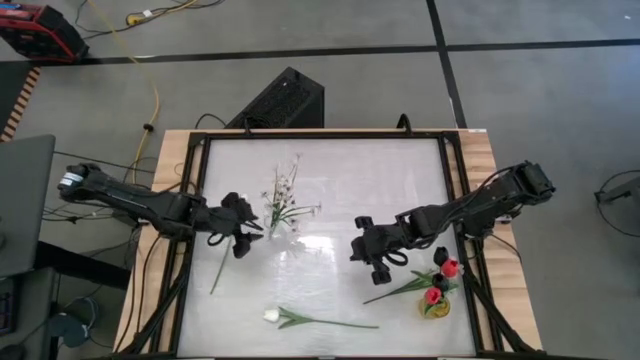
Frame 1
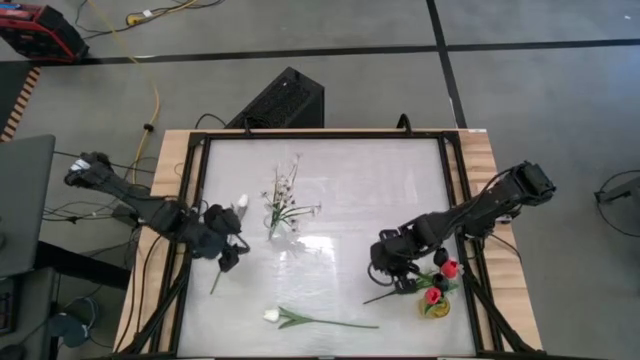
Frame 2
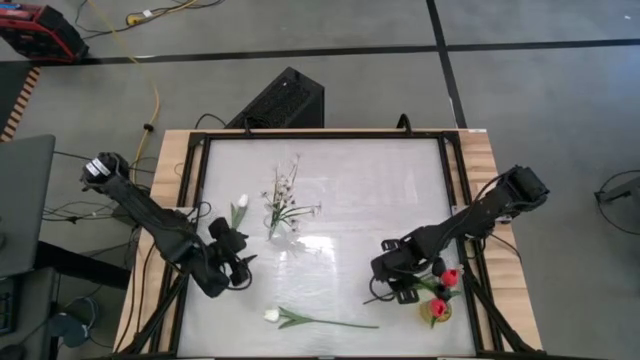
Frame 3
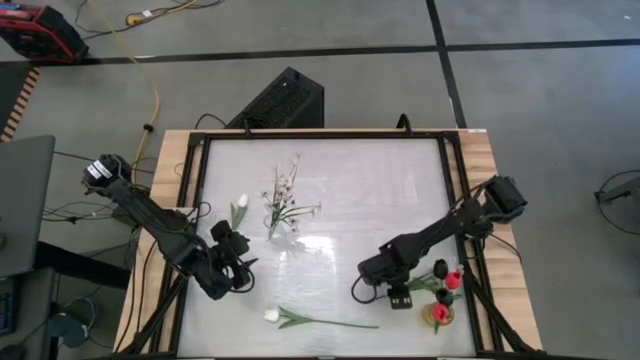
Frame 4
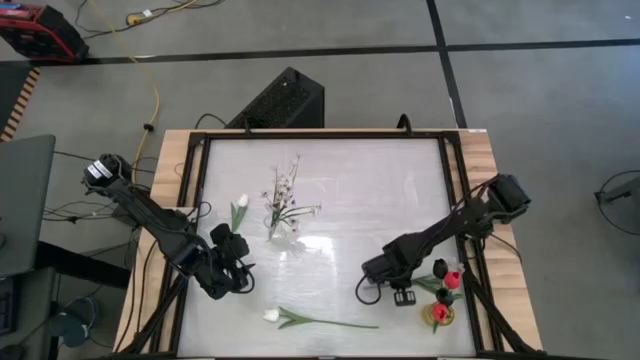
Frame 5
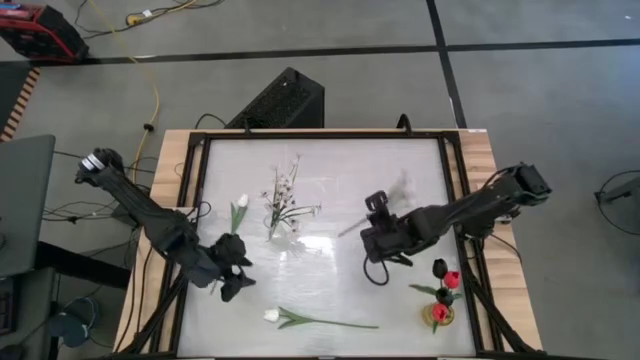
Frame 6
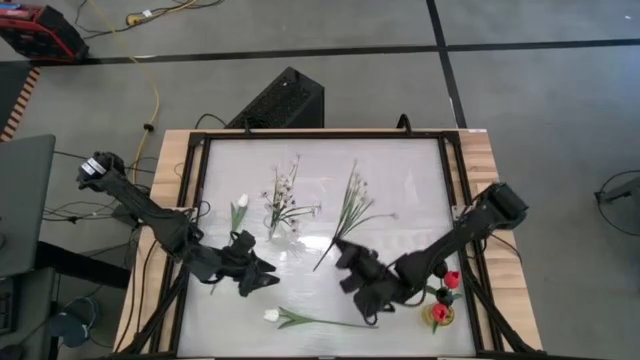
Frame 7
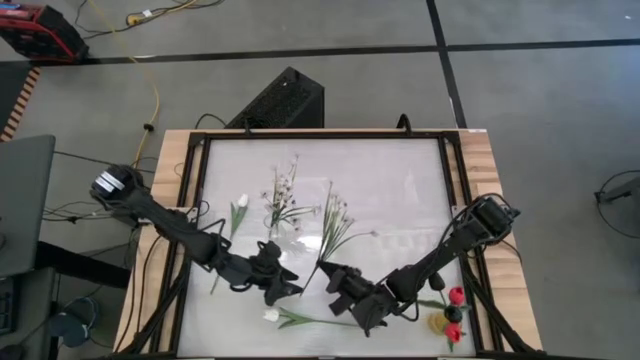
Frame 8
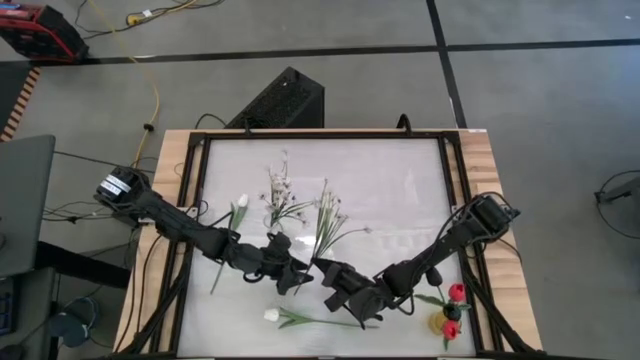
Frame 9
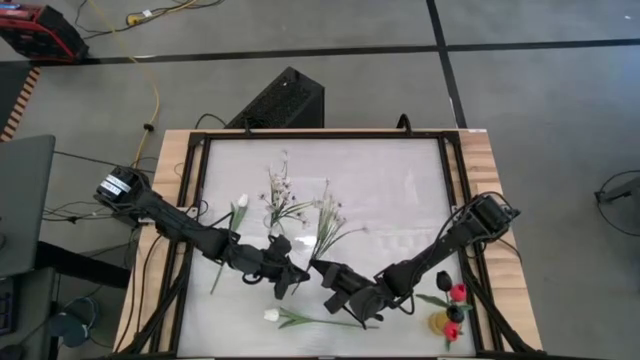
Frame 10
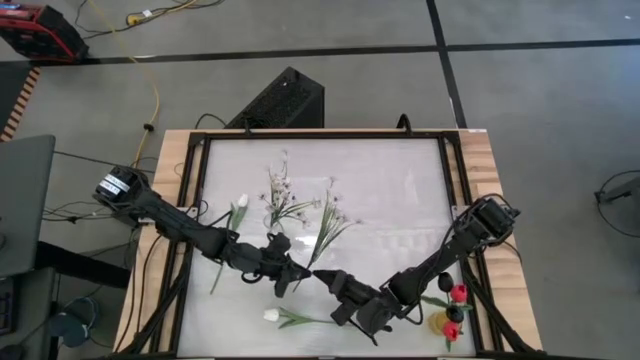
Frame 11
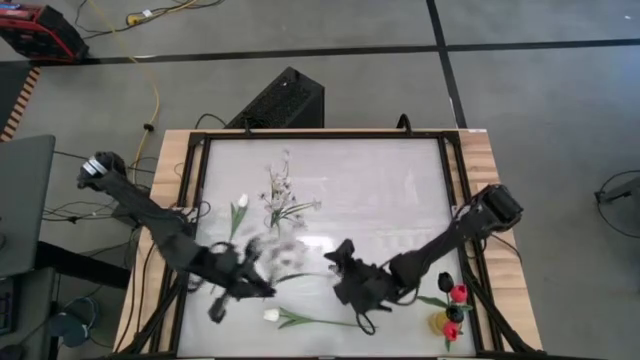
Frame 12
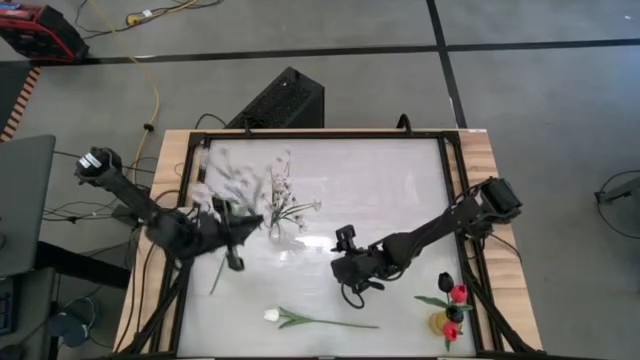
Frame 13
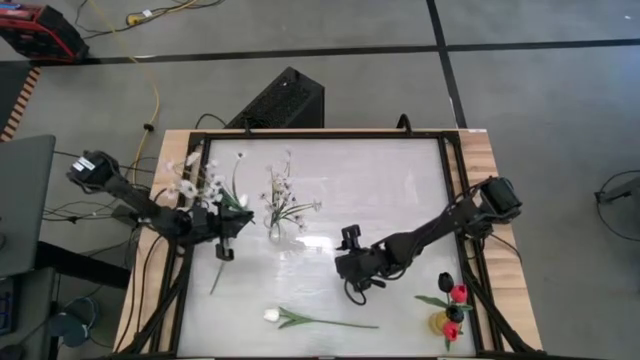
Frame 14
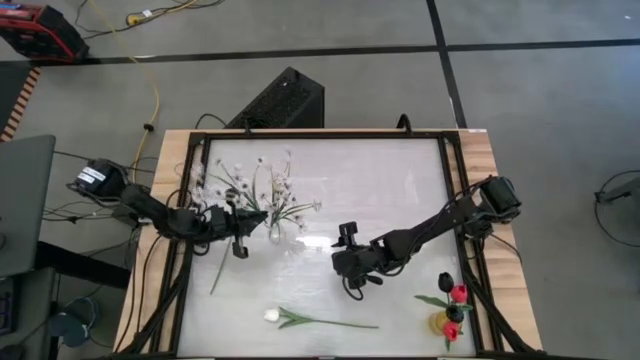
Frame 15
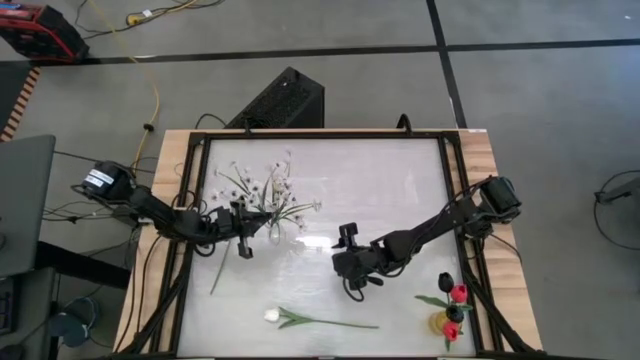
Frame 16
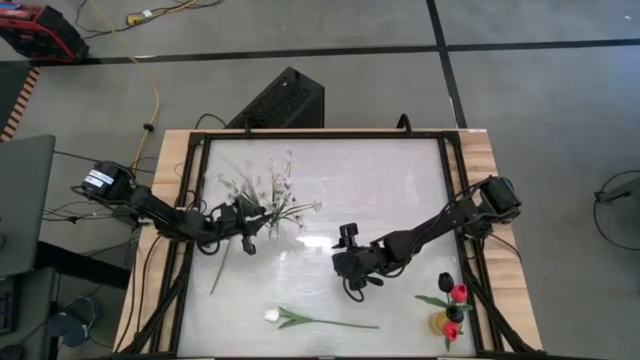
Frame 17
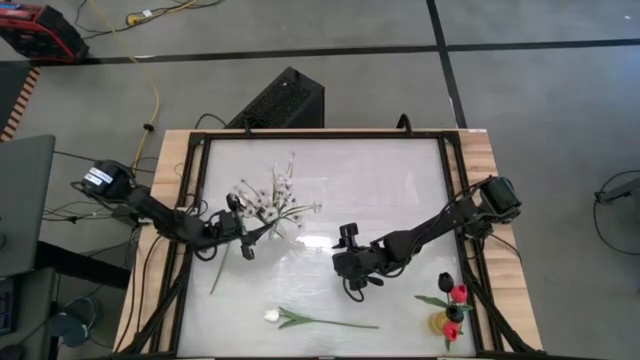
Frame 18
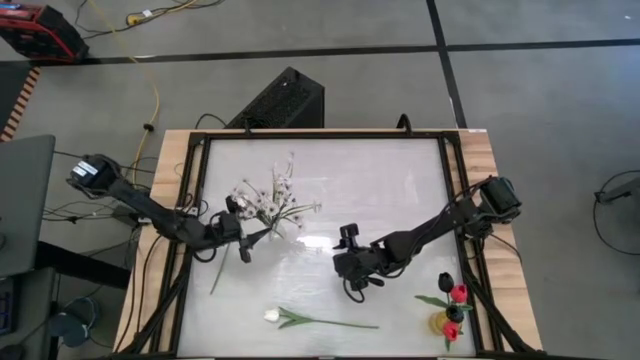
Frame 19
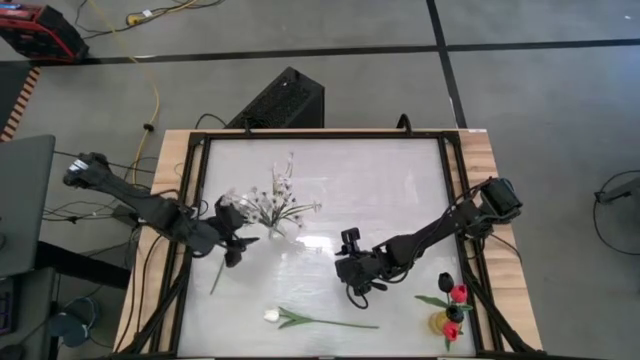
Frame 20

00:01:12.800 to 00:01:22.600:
Task: Sort flowers into vase by color
Put the white flowers into the transparent vase

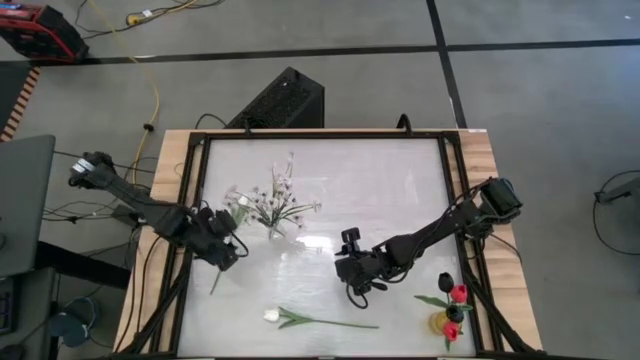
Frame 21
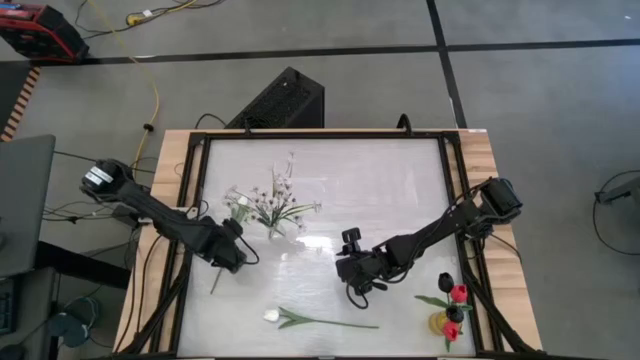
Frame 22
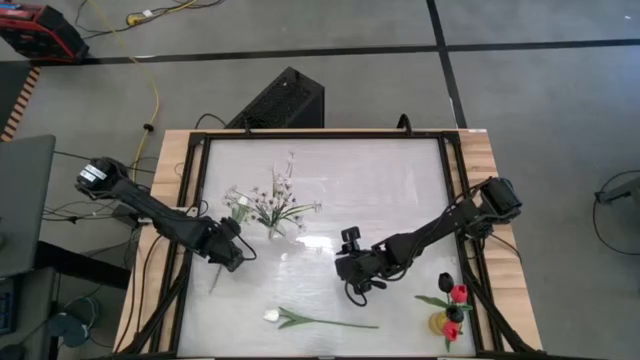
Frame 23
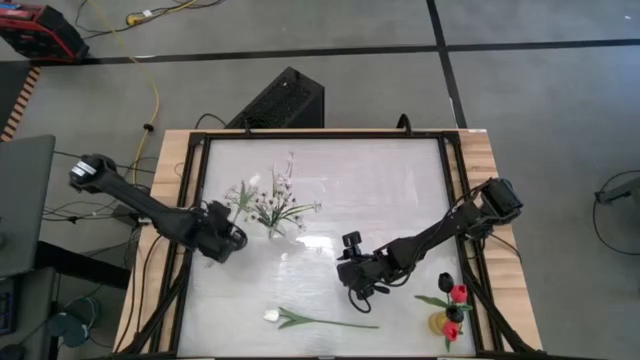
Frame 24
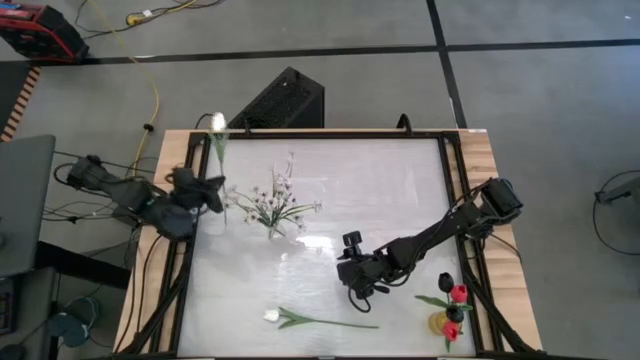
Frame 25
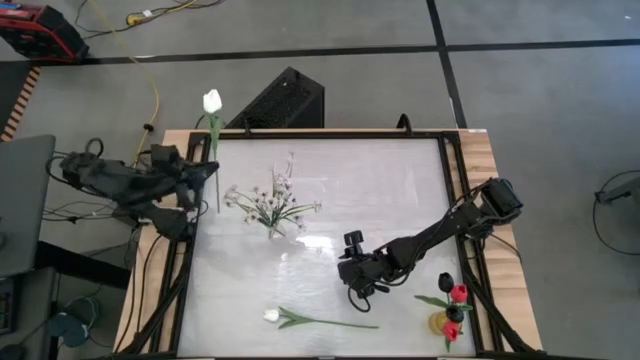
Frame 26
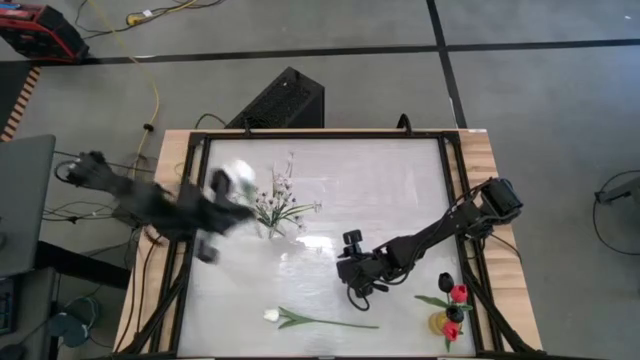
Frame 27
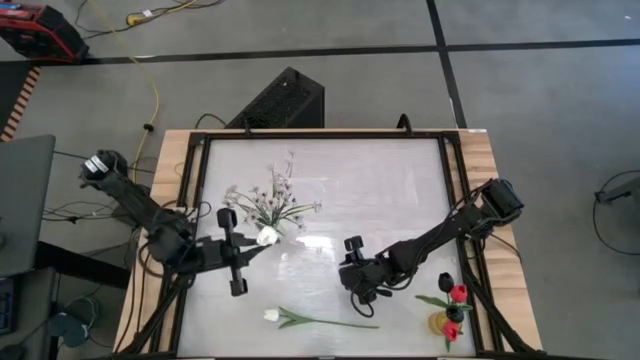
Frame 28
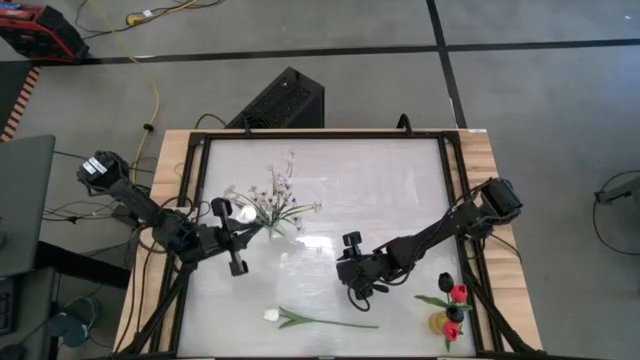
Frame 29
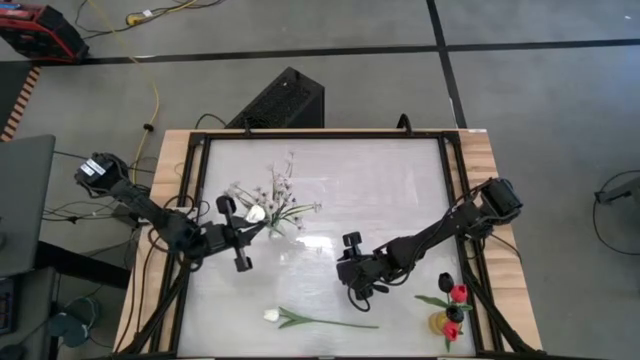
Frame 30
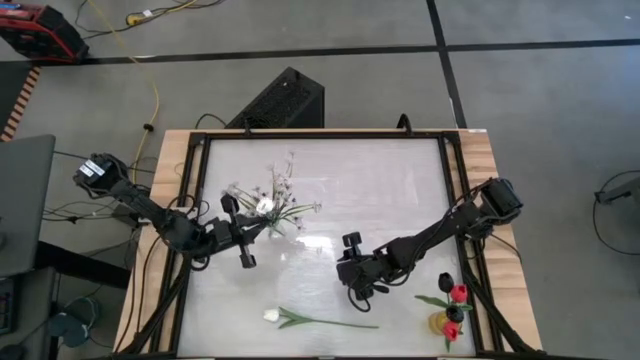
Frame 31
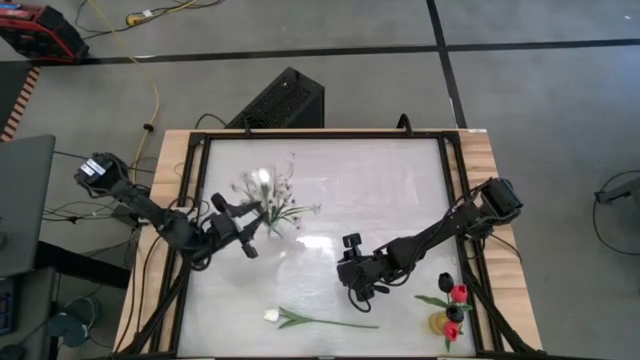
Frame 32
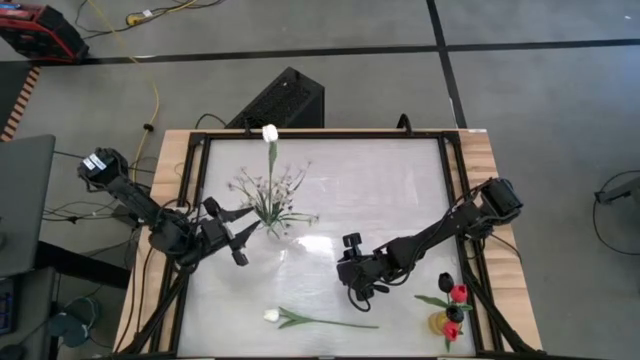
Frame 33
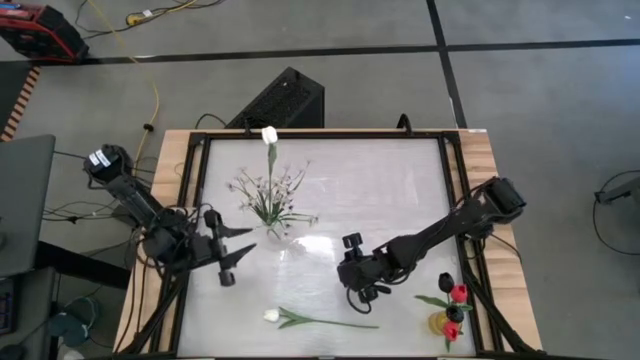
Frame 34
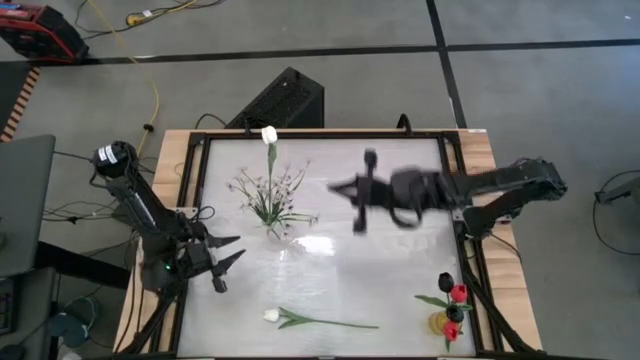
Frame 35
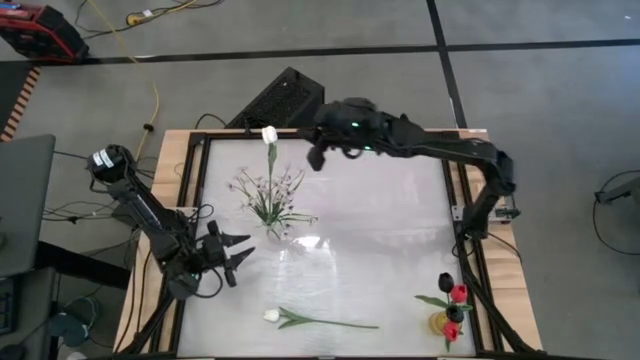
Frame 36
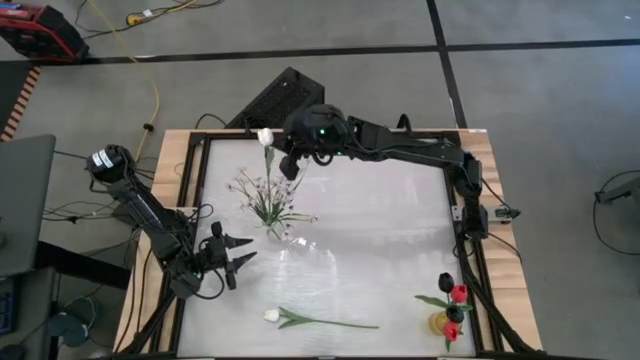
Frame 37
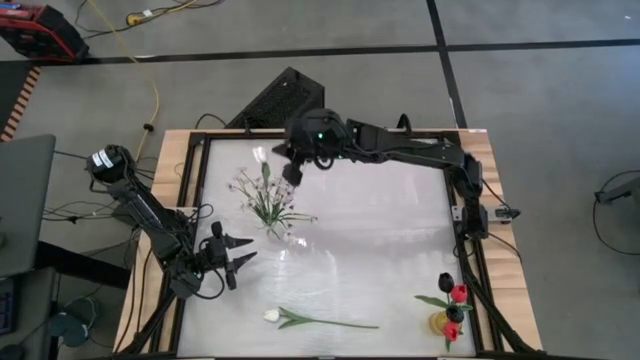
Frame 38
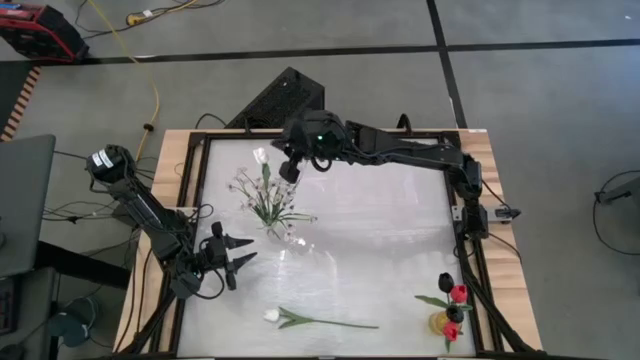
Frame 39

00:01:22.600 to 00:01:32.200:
Put the top white flower into the transparent vase

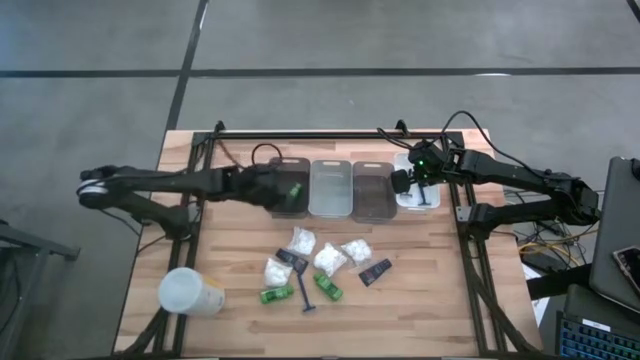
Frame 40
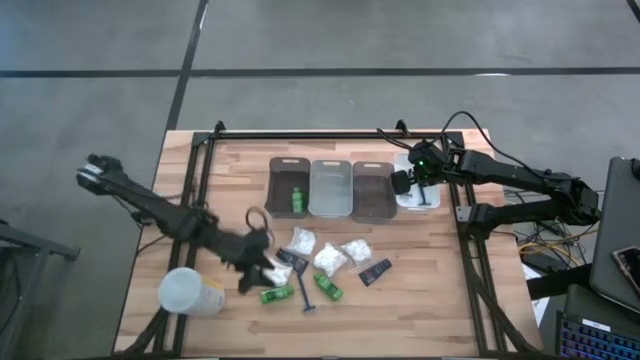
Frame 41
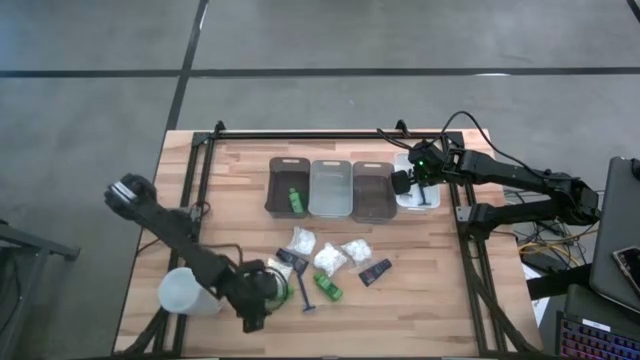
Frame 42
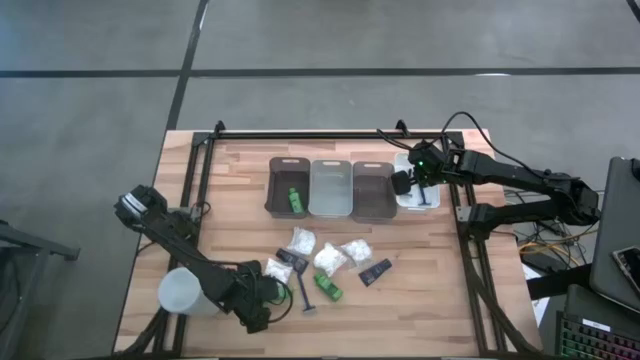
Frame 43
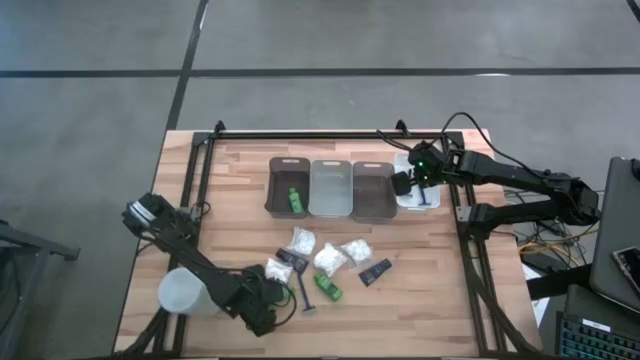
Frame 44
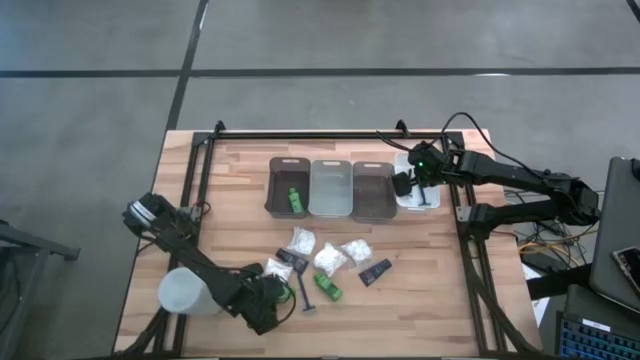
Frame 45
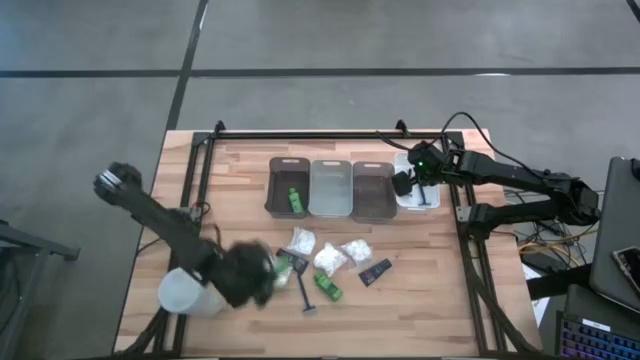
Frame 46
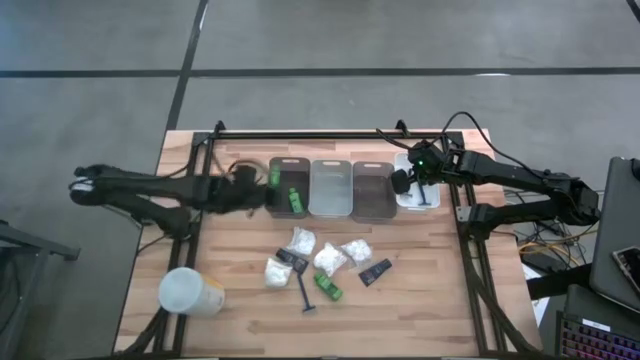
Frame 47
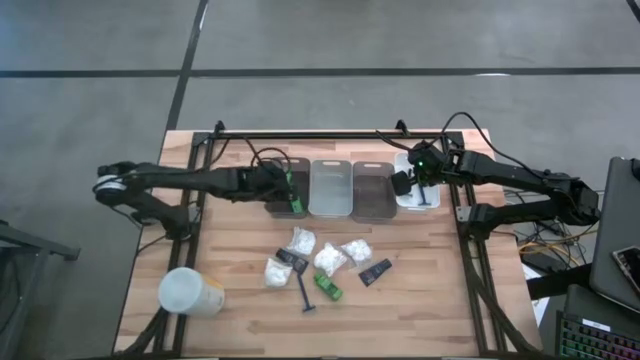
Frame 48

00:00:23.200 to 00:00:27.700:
Task: Pick & Place Travel size toiletries
Put the left green shampoo into the left black bin
